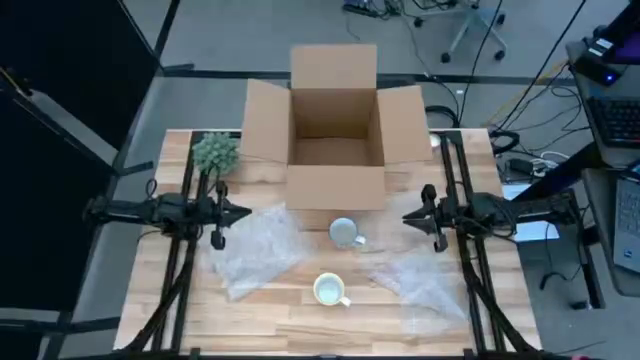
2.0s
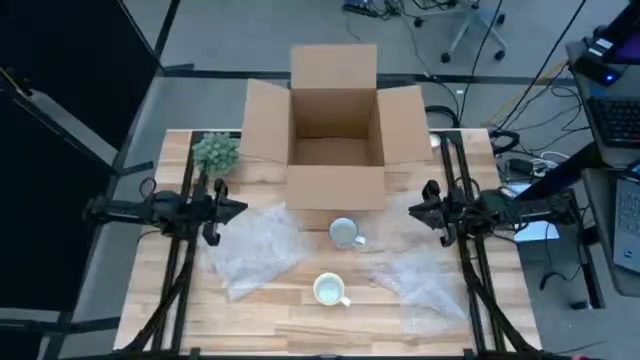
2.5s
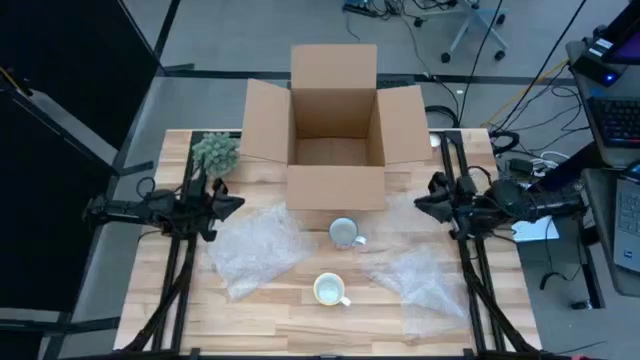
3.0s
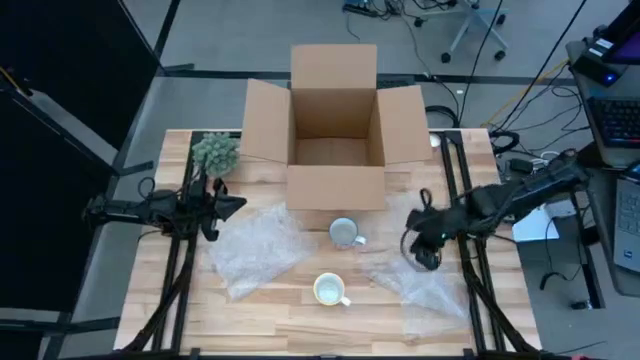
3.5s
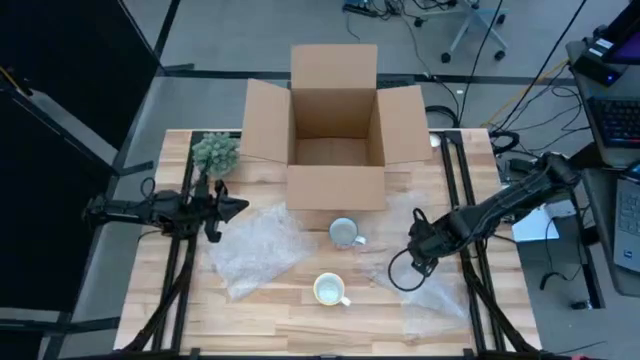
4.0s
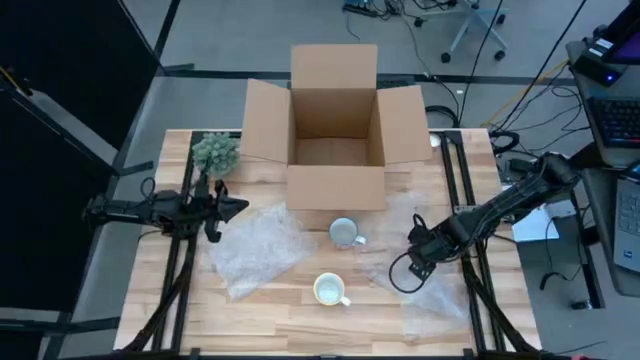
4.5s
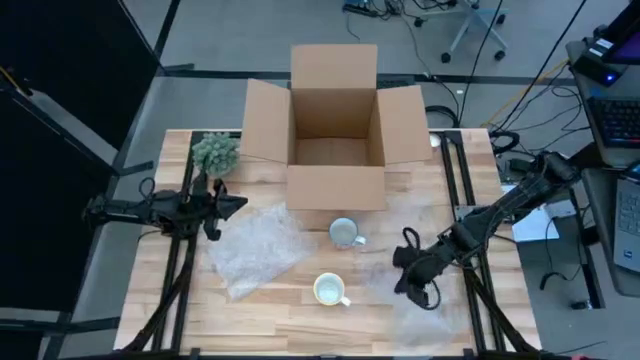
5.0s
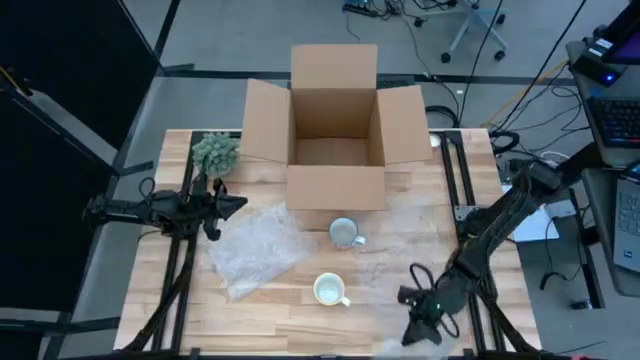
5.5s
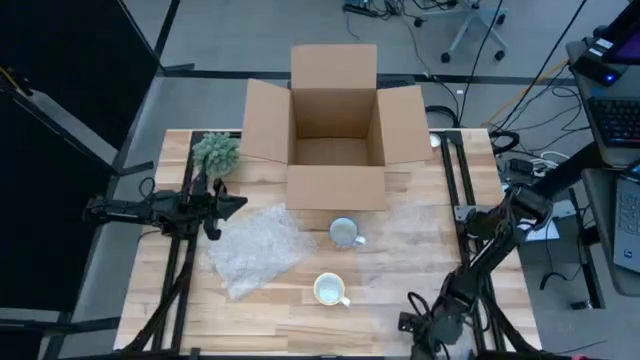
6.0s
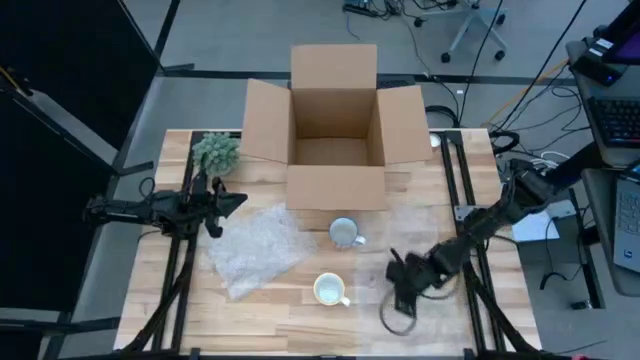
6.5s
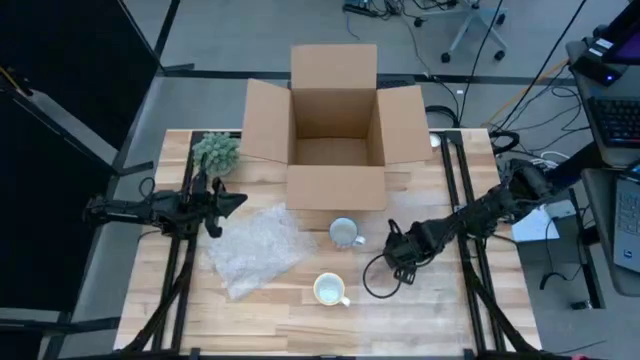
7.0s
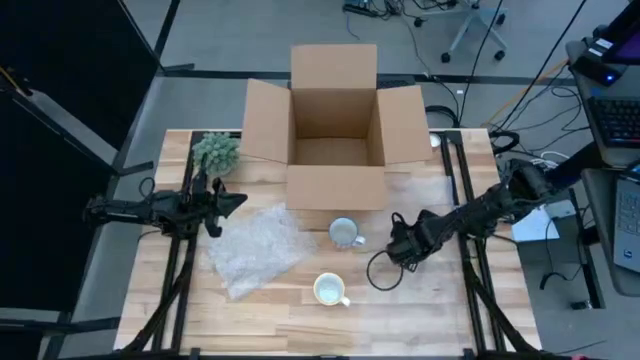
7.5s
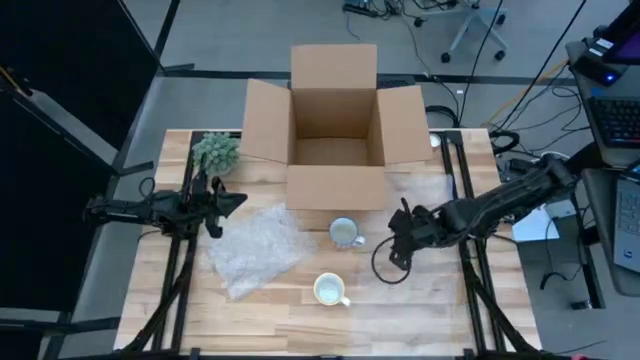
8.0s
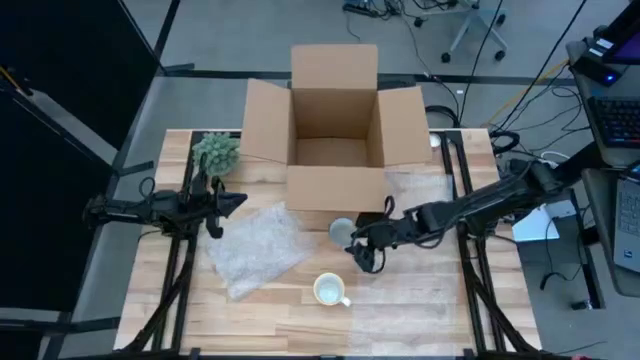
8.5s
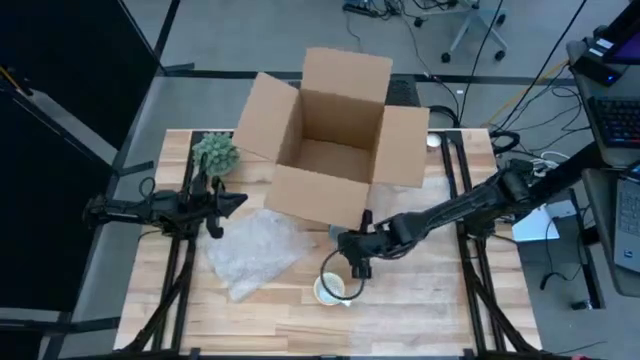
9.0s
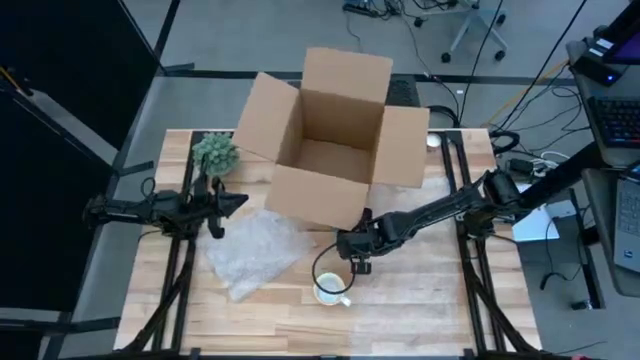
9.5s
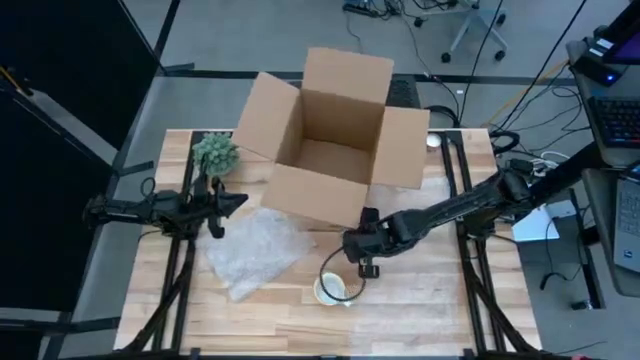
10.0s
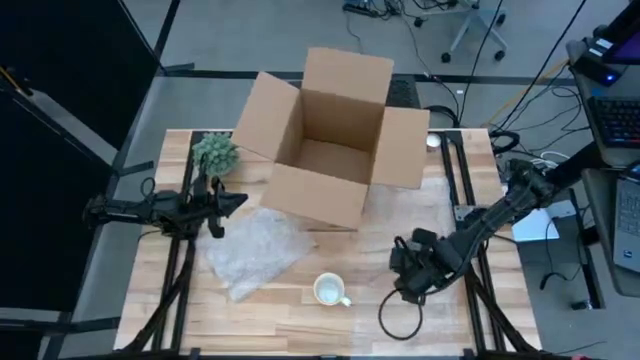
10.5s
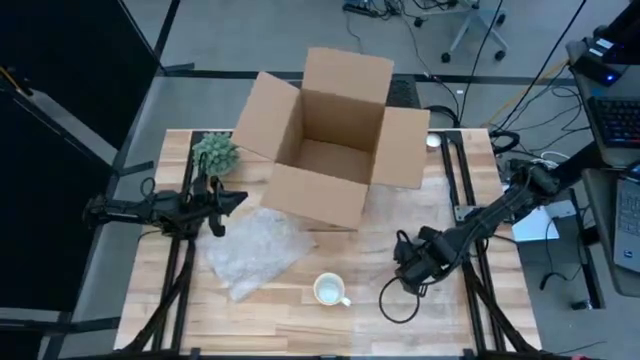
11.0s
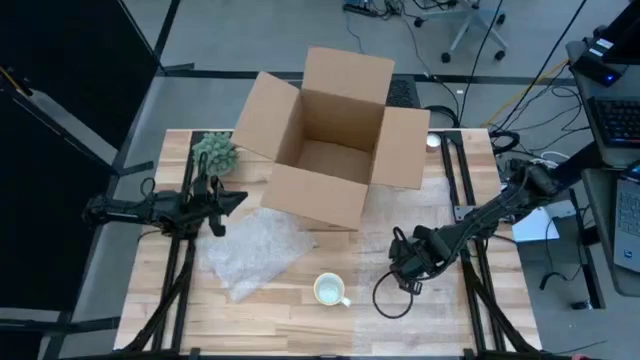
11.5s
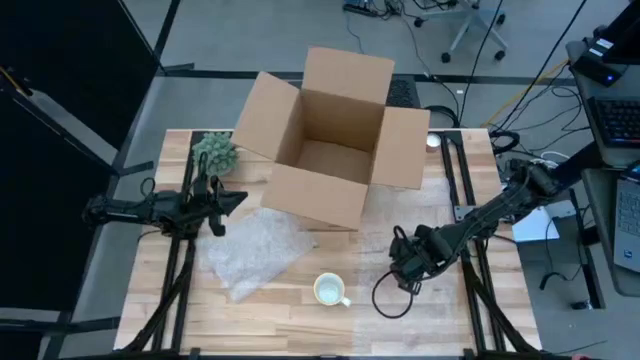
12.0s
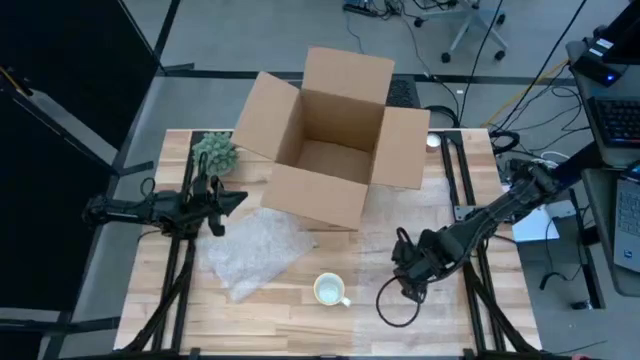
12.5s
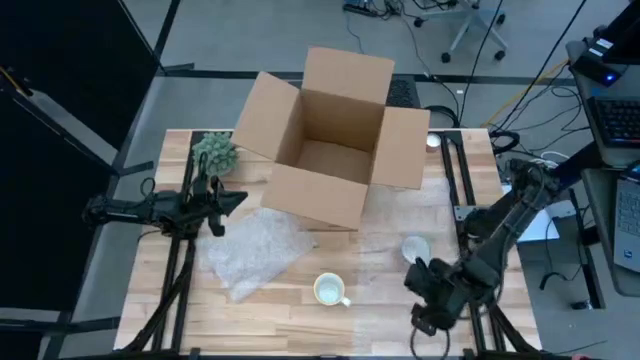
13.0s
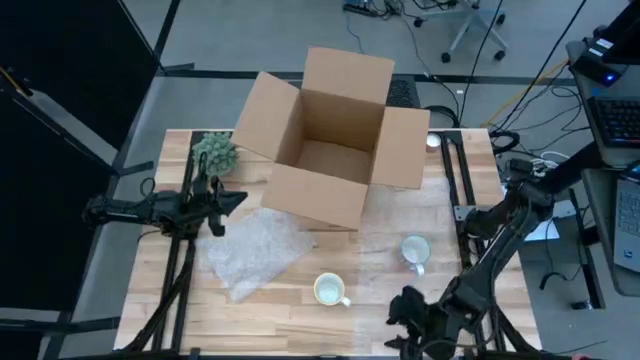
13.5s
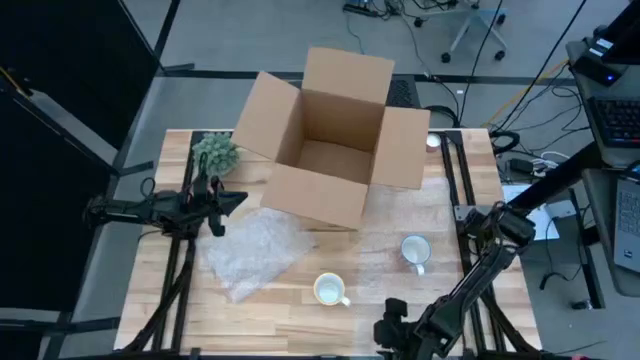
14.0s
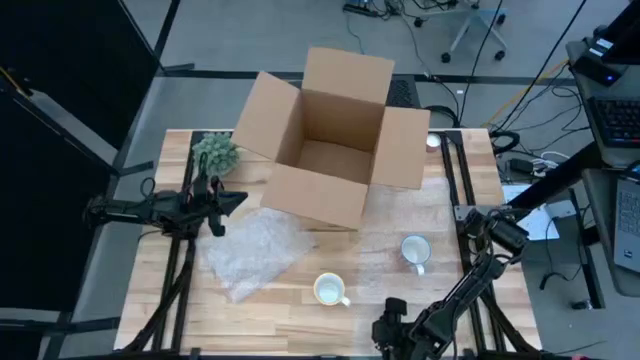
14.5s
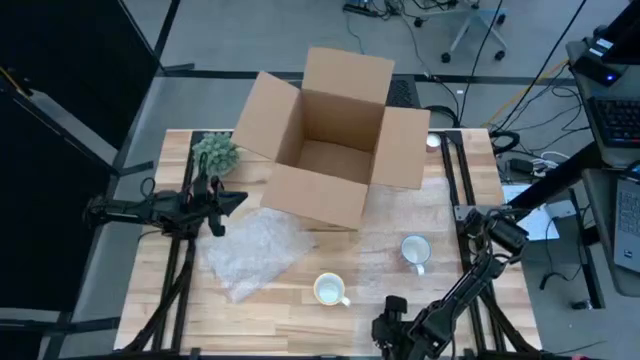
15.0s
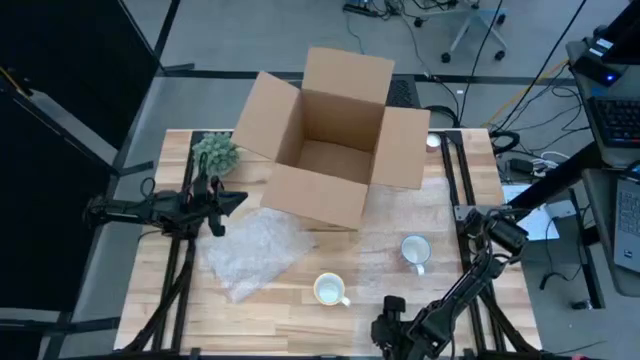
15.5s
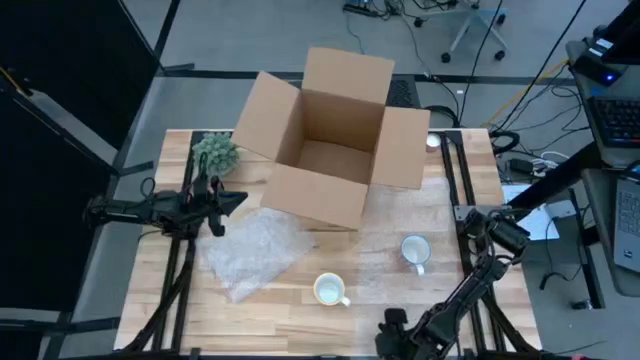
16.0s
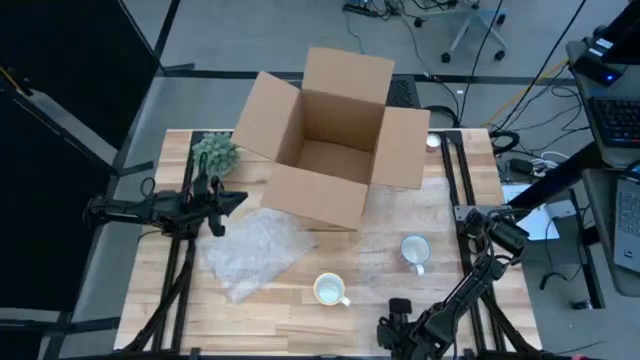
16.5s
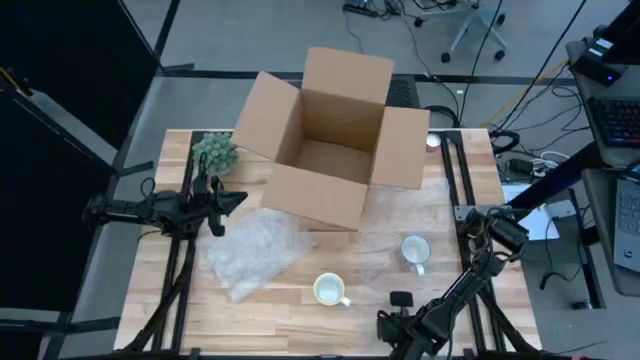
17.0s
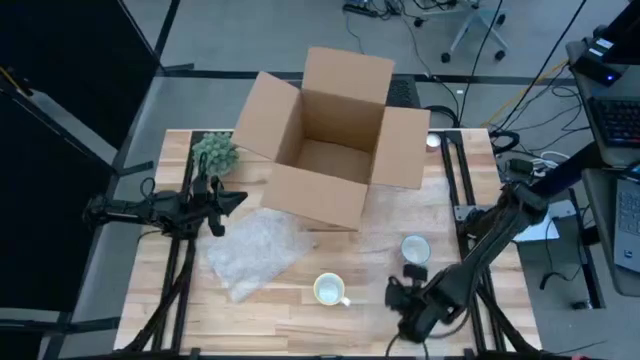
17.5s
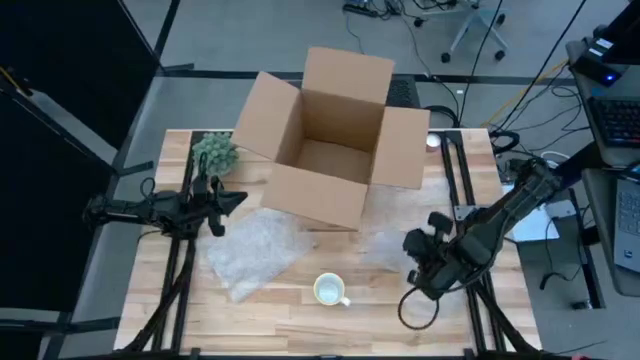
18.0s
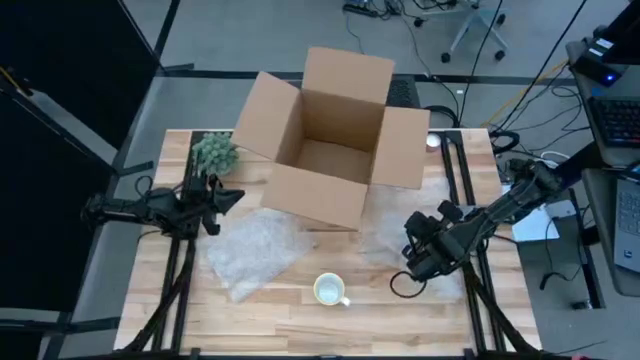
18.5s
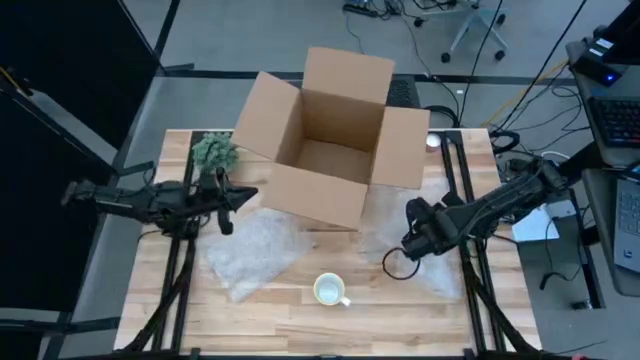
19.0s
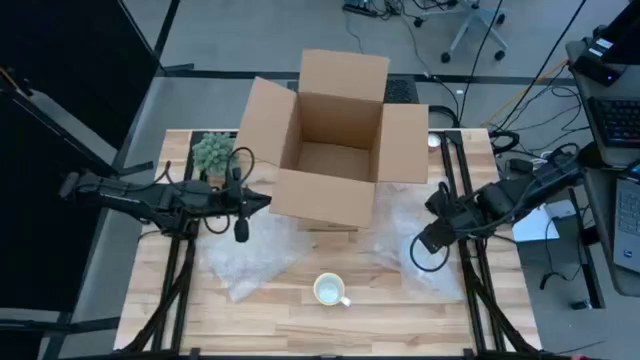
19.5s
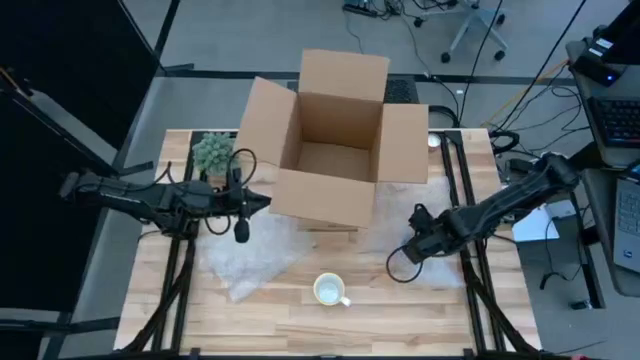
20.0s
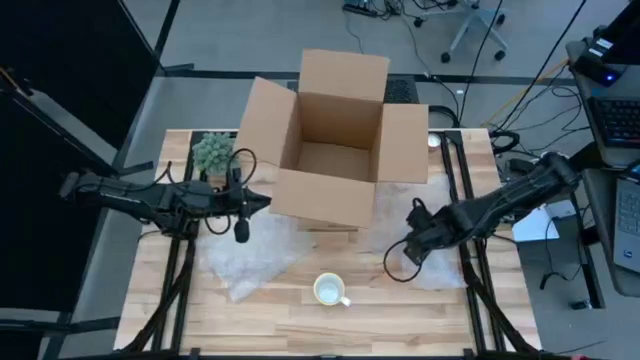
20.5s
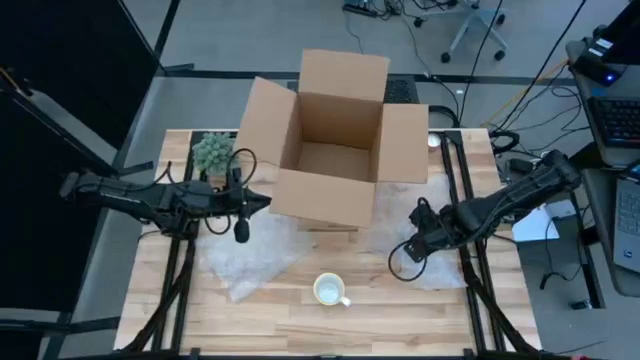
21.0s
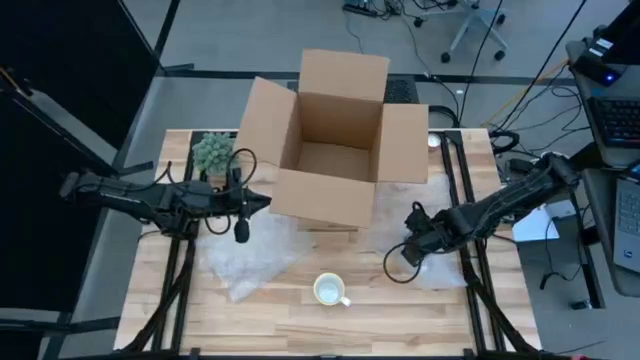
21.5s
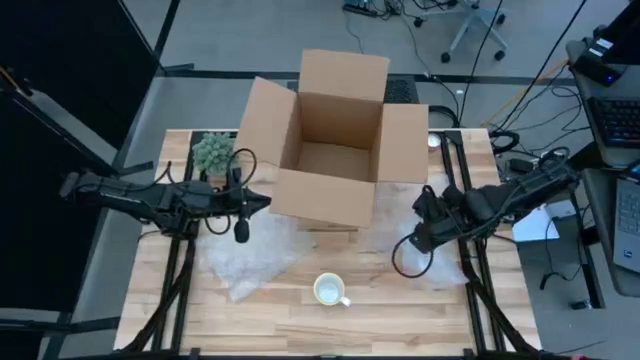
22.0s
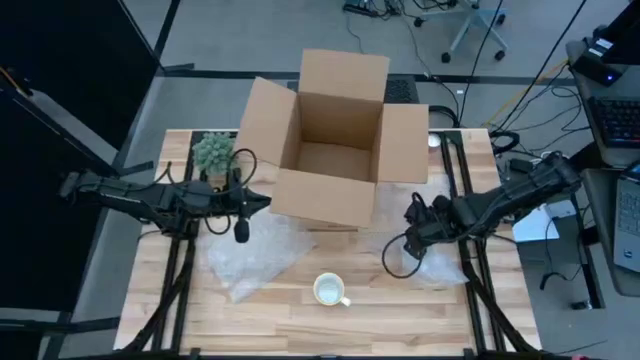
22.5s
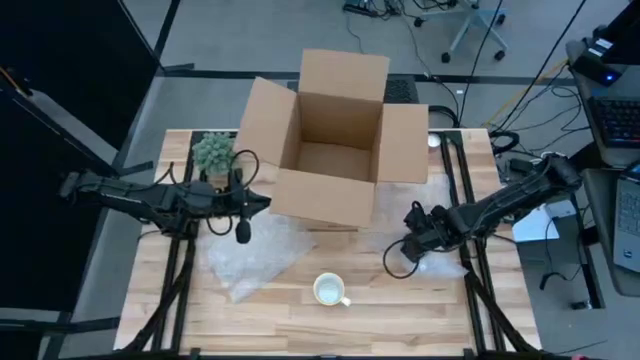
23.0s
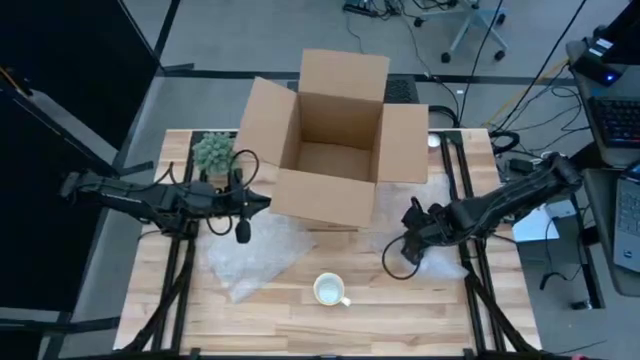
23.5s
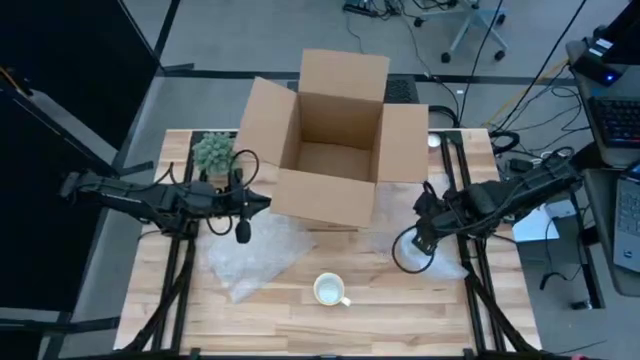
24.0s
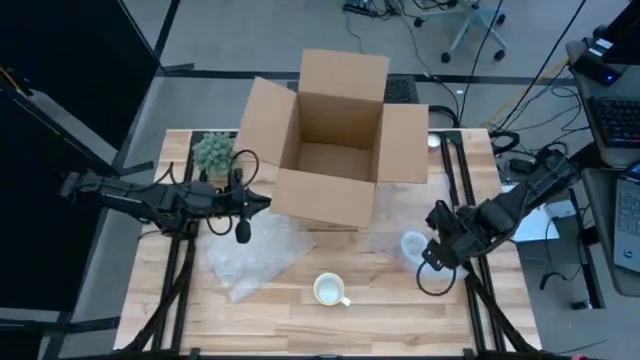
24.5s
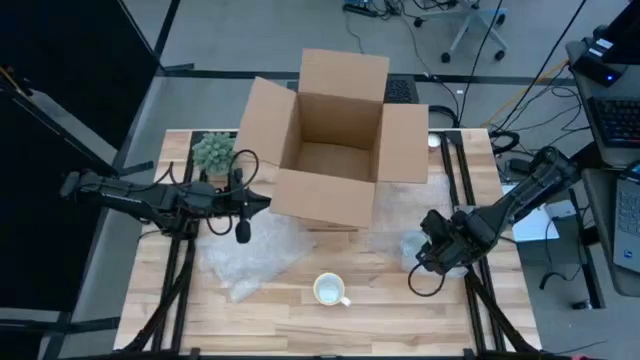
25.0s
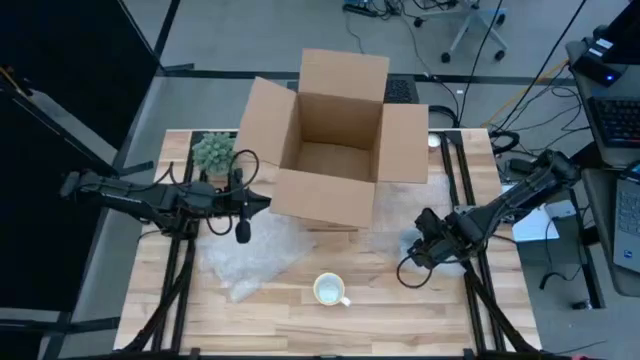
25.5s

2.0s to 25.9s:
Task: wrap mug
Wrap the red mug with bubble wrap
